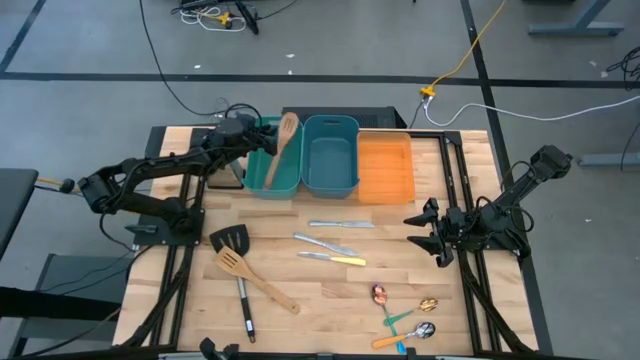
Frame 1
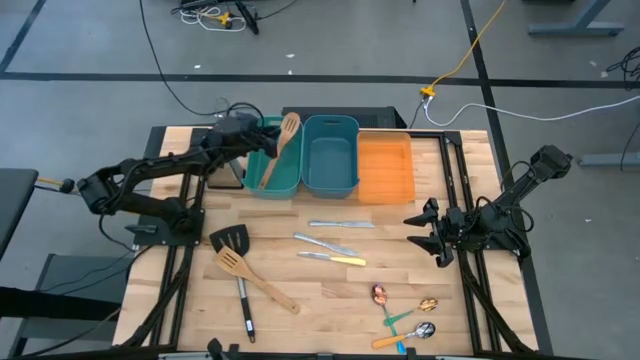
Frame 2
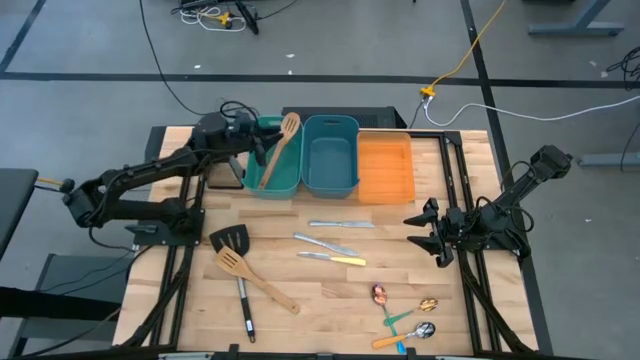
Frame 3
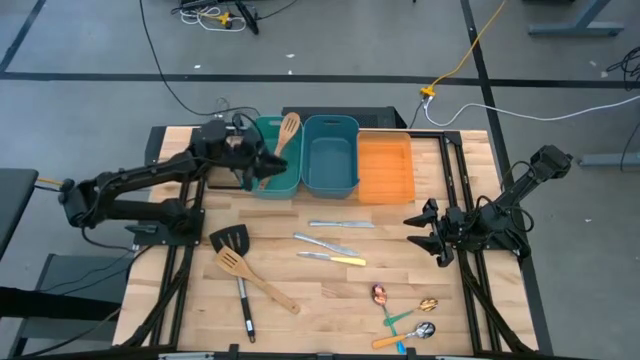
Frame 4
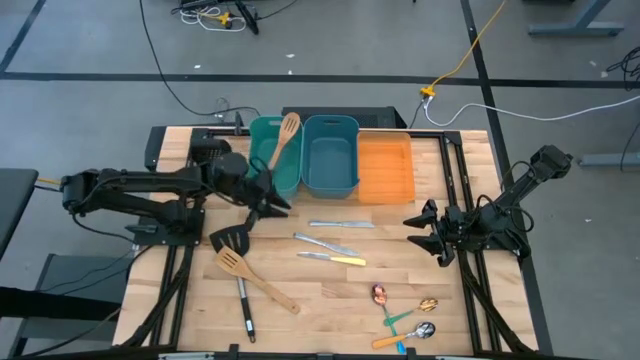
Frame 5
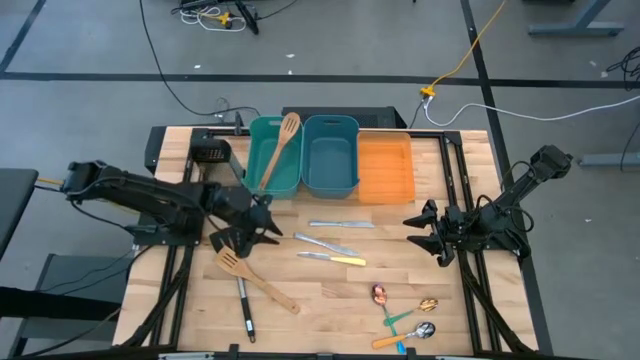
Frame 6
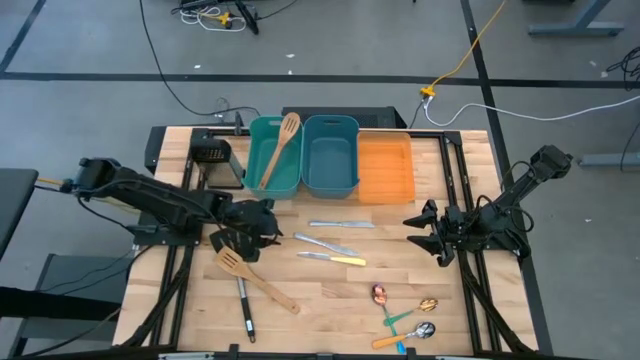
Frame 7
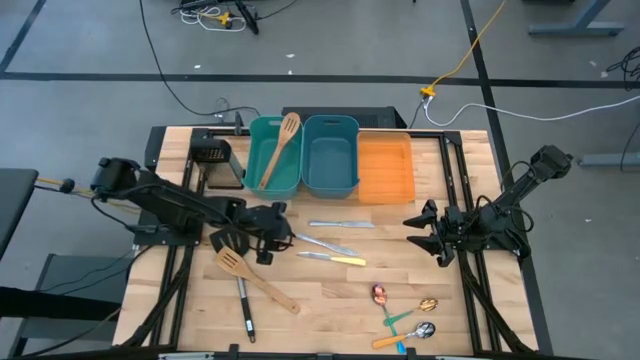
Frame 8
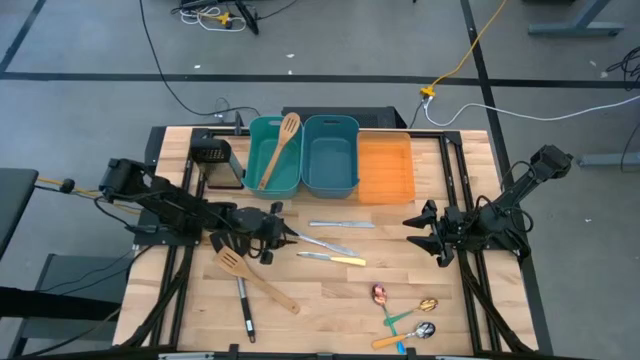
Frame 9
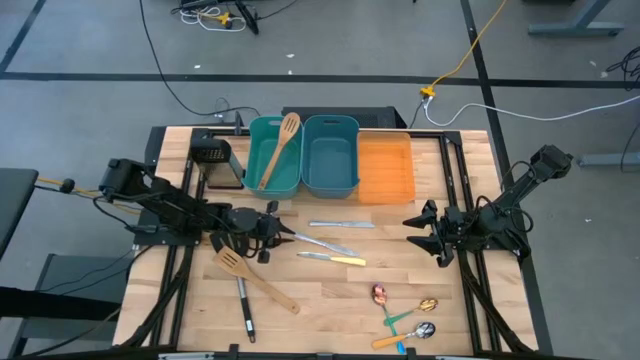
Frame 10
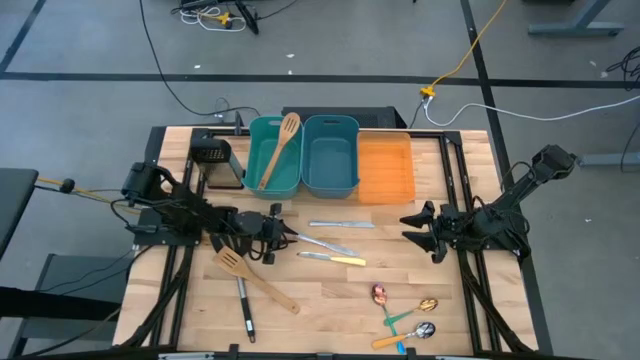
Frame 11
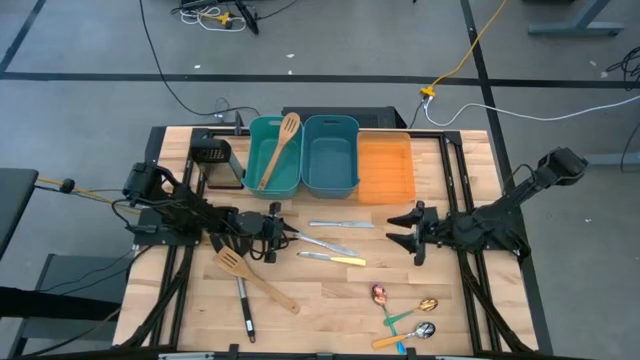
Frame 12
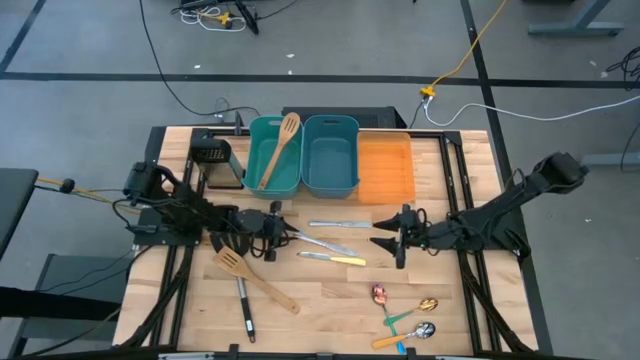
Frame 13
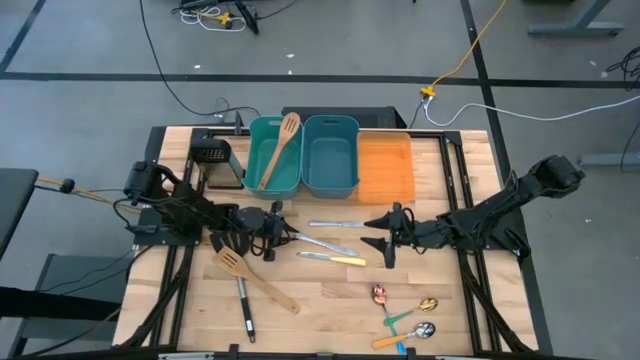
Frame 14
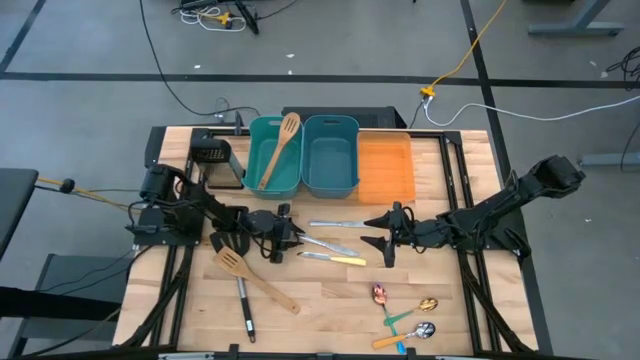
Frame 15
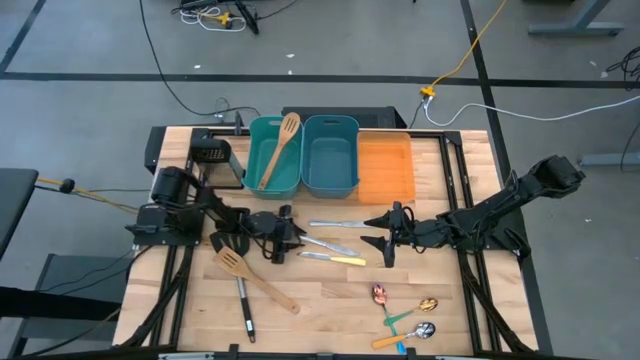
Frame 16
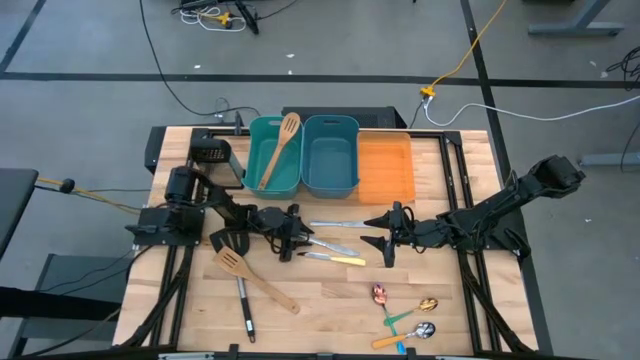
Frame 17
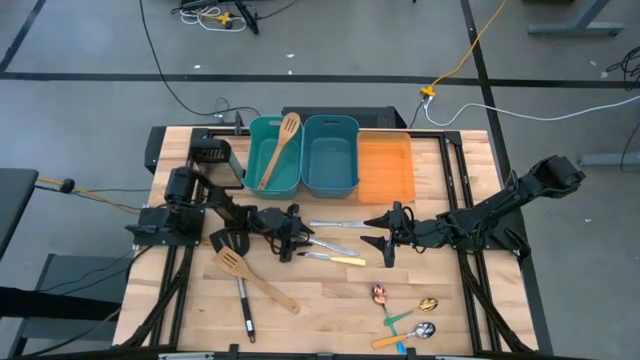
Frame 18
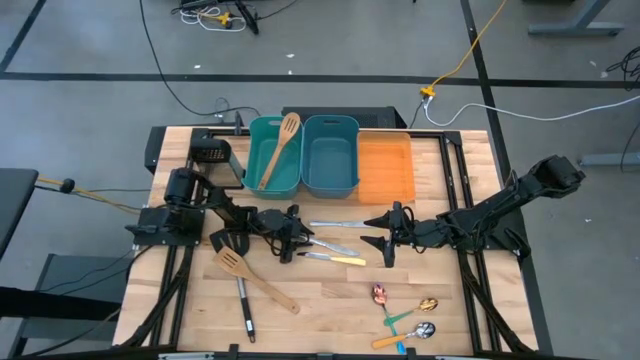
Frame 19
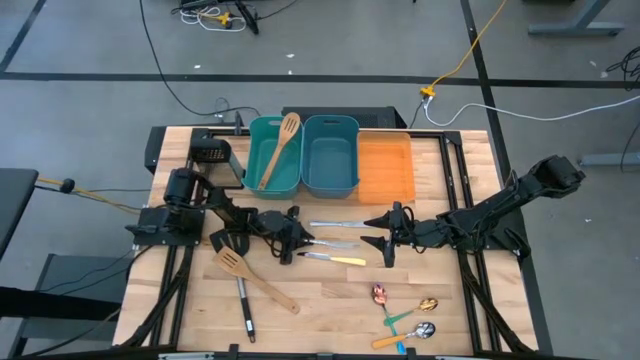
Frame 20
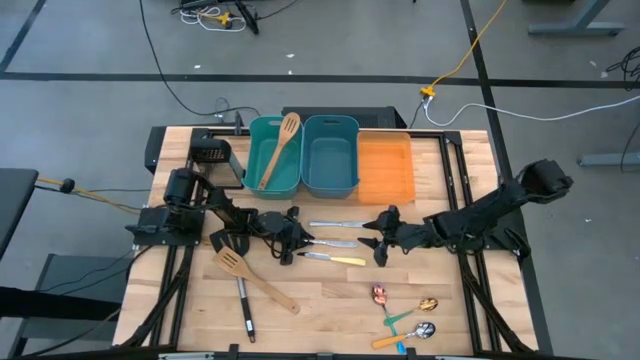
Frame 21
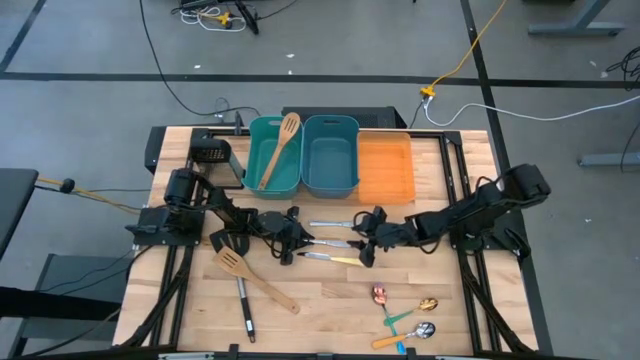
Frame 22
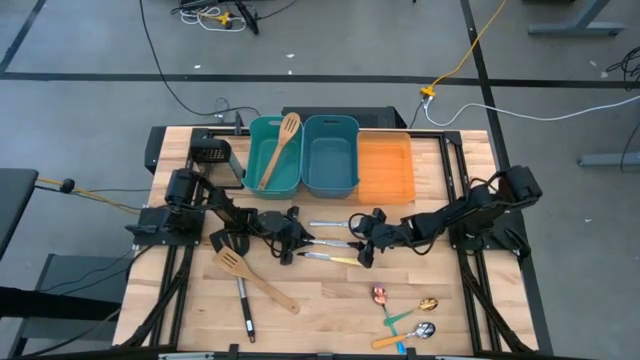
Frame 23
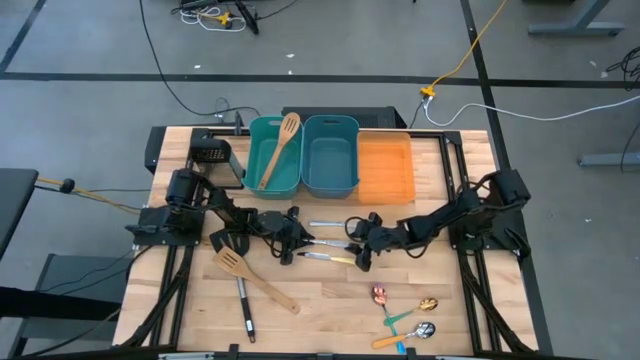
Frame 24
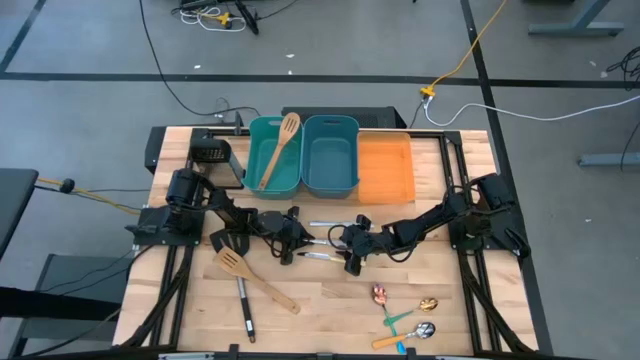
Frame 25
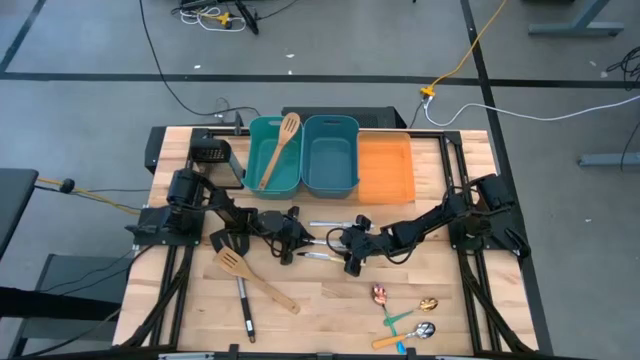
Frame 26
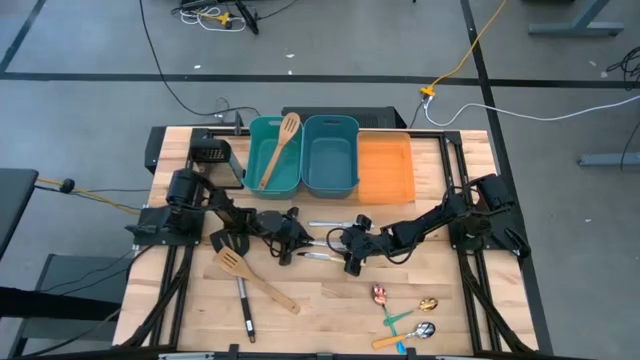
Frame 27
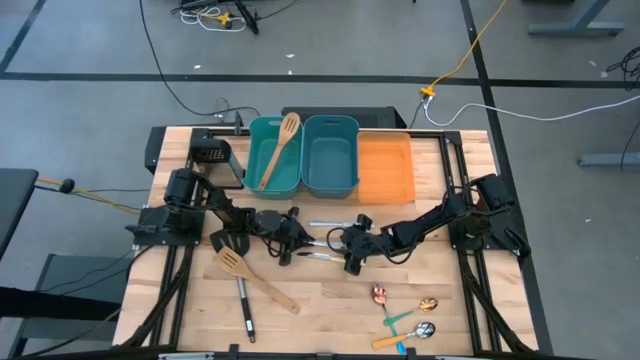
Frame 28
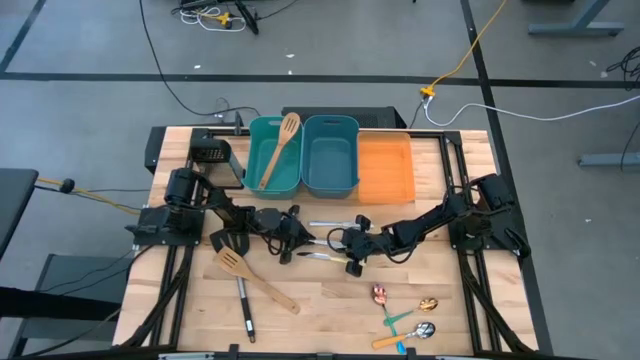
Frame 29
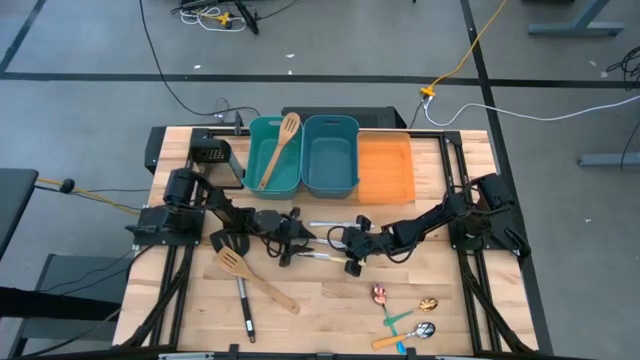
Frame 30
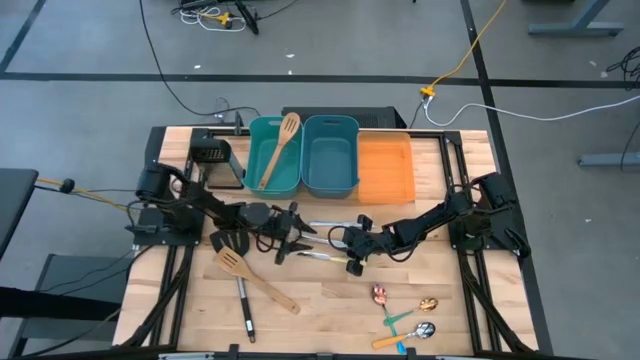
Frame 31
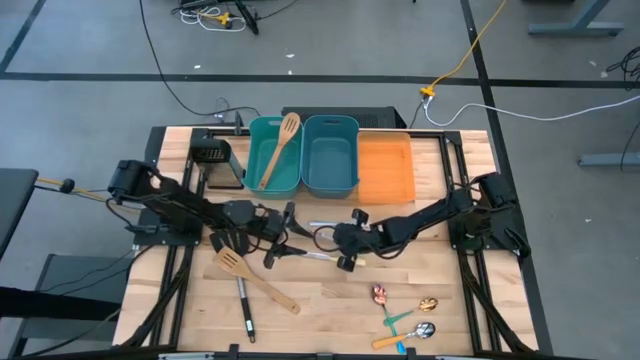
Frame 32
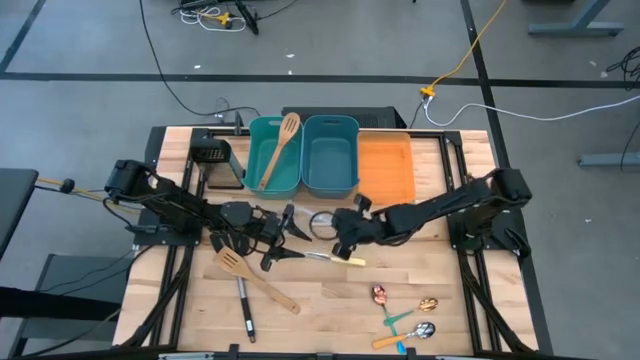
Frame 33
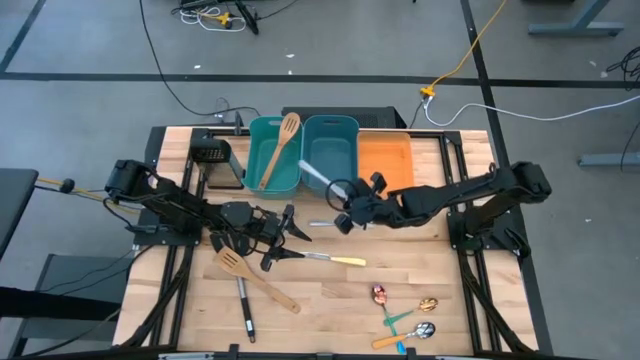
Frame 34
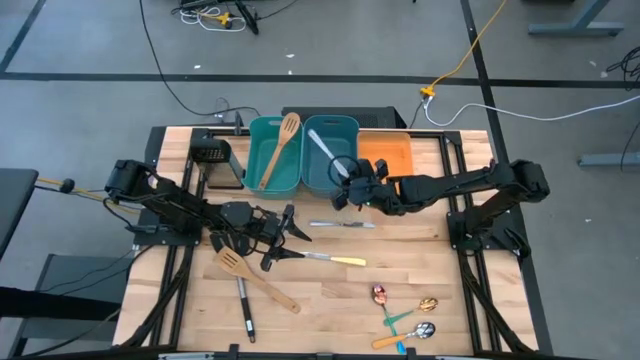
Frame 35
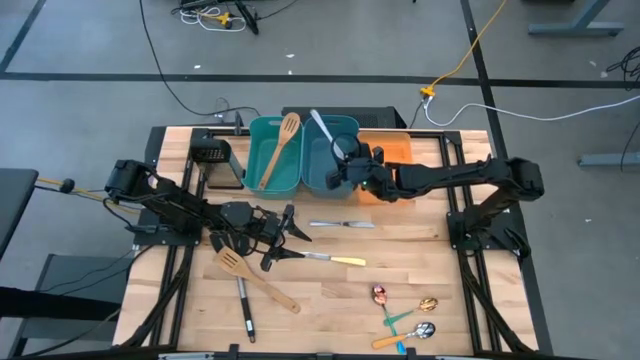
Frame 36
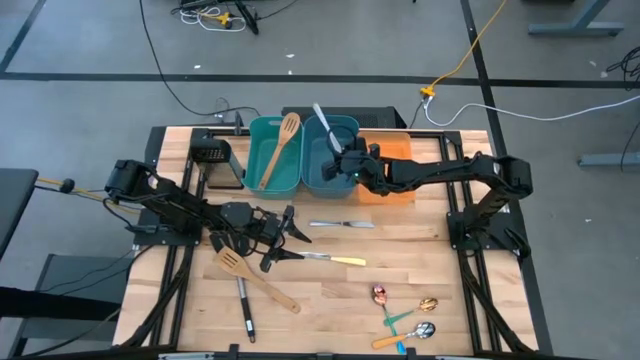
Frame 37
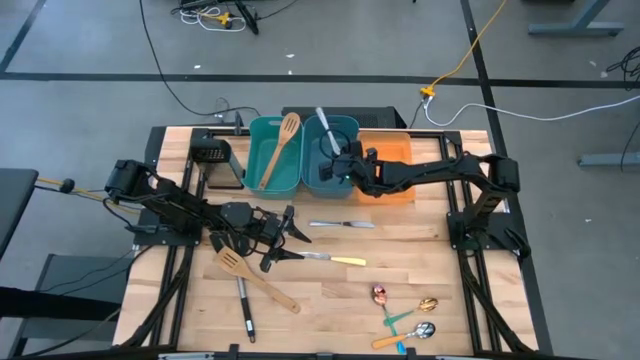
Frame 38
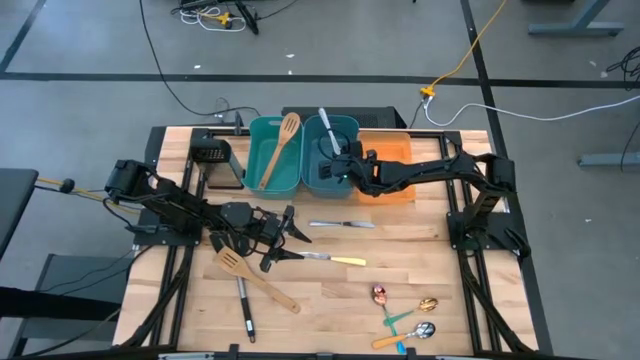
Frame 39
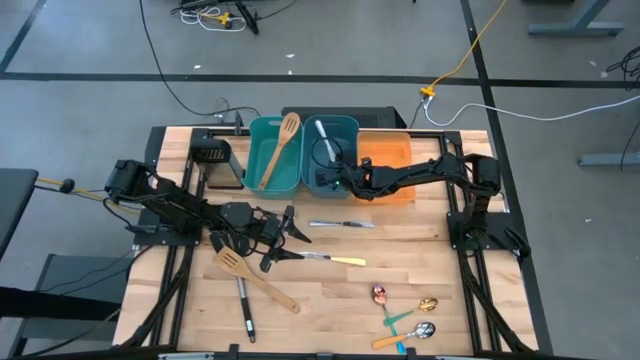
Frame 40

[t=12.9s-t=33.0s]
Task: Pick & Place Kitchen Items
Put the bottom silver knife into the blue bin
